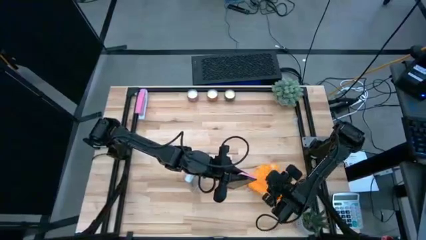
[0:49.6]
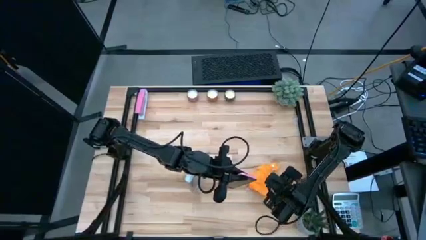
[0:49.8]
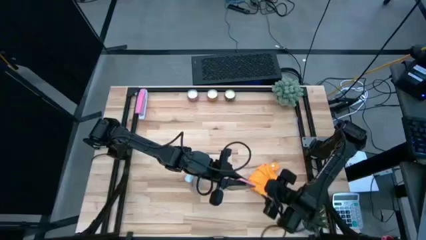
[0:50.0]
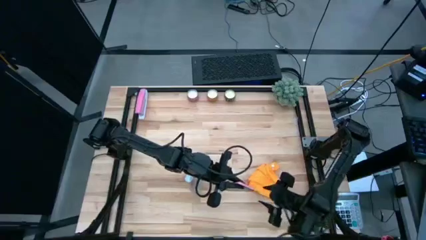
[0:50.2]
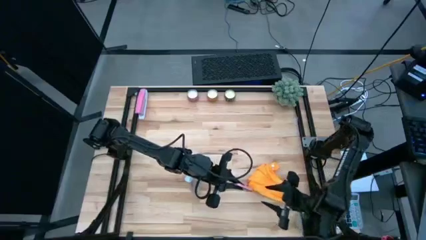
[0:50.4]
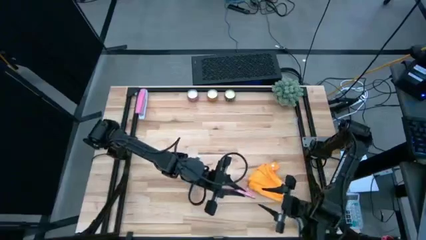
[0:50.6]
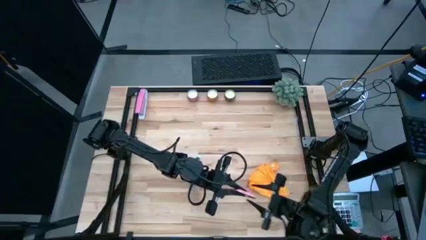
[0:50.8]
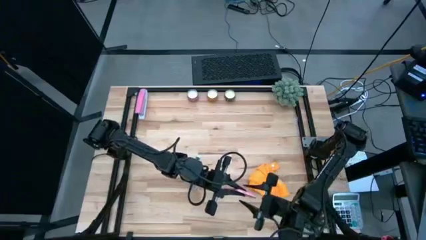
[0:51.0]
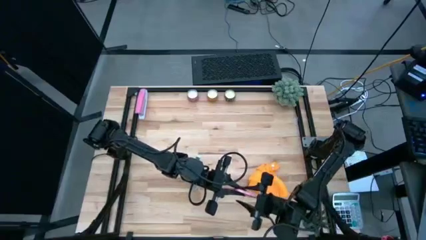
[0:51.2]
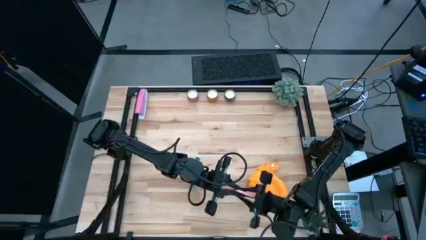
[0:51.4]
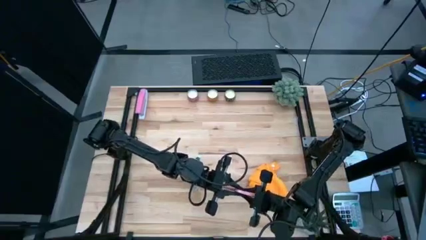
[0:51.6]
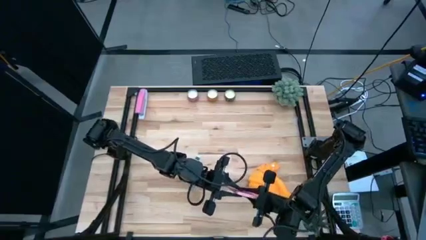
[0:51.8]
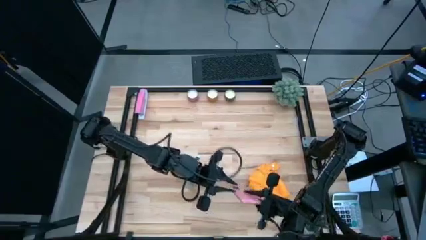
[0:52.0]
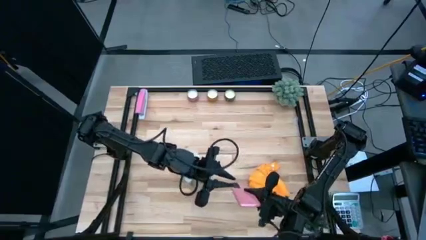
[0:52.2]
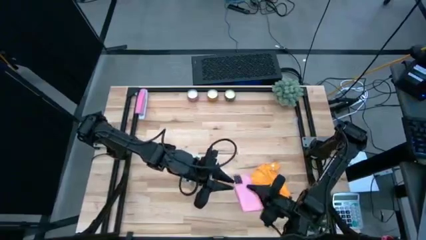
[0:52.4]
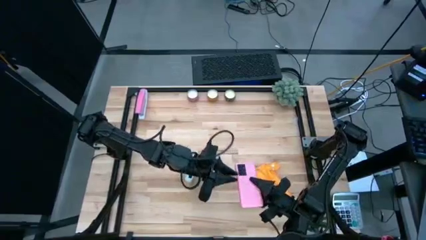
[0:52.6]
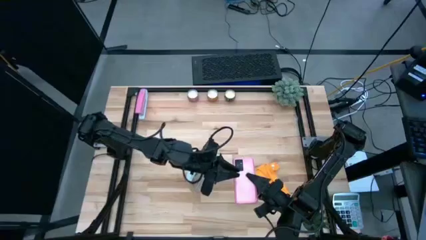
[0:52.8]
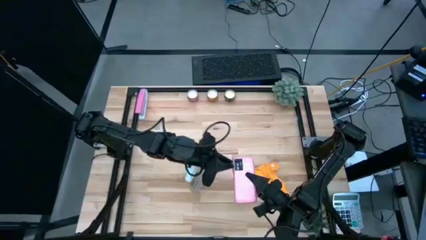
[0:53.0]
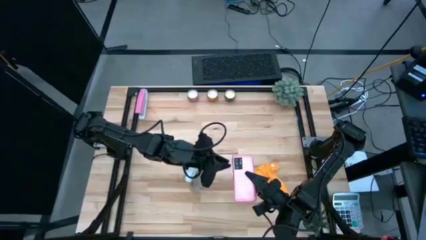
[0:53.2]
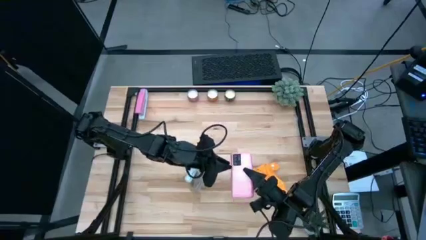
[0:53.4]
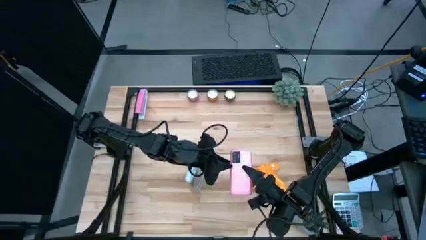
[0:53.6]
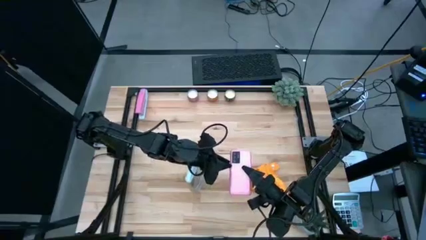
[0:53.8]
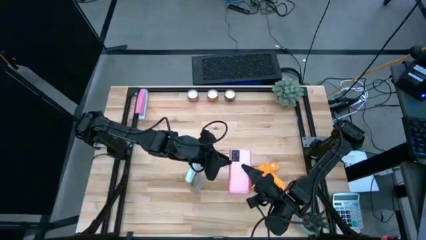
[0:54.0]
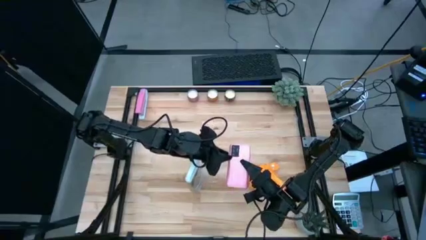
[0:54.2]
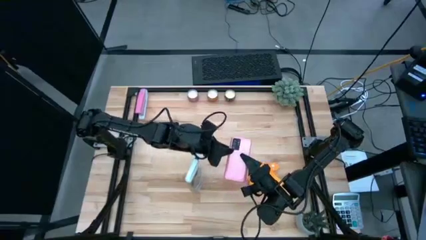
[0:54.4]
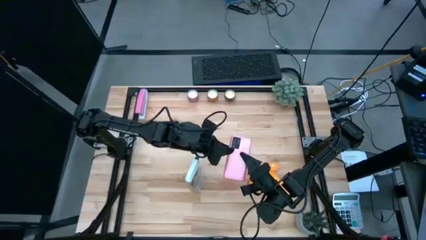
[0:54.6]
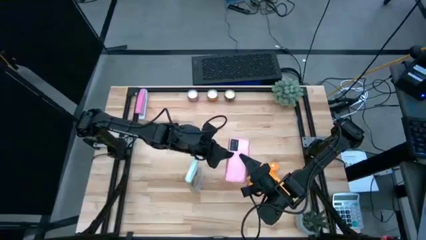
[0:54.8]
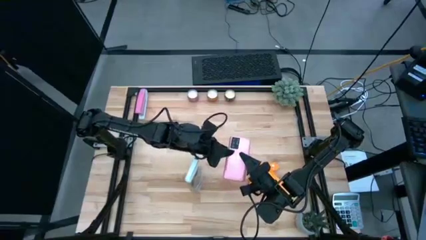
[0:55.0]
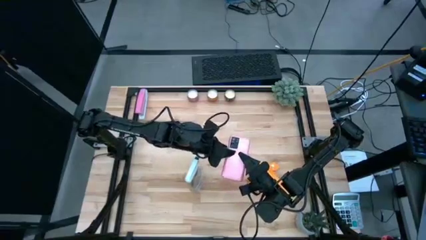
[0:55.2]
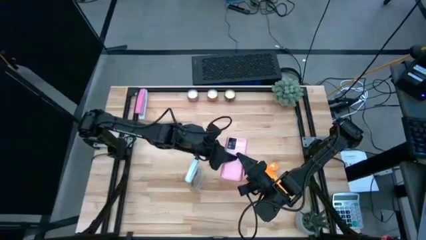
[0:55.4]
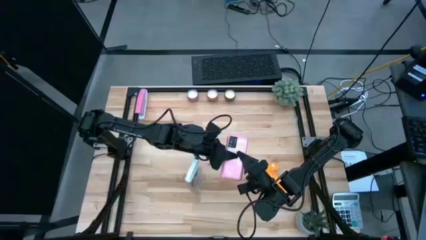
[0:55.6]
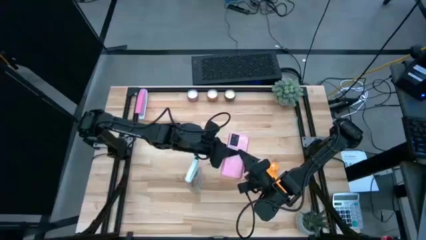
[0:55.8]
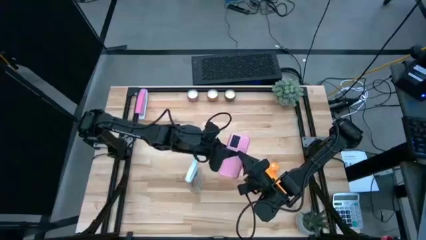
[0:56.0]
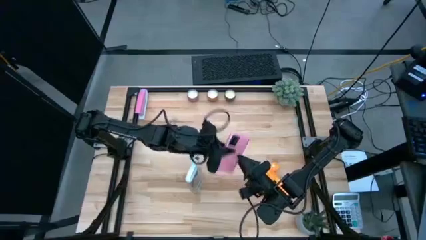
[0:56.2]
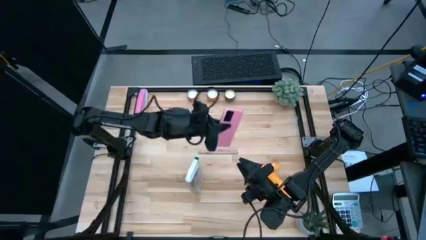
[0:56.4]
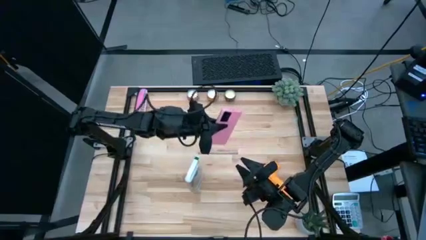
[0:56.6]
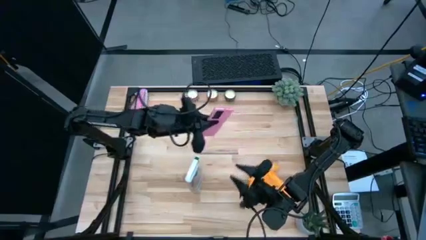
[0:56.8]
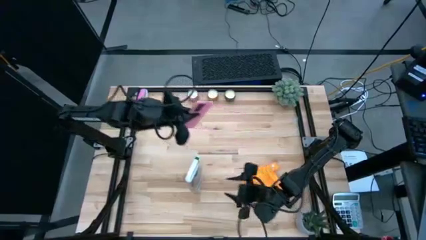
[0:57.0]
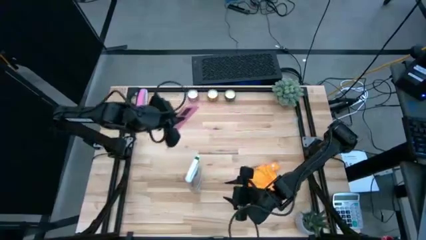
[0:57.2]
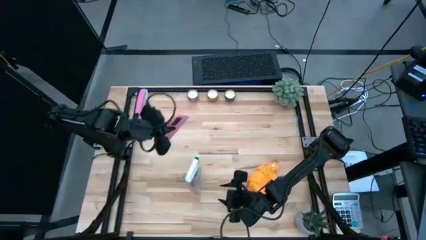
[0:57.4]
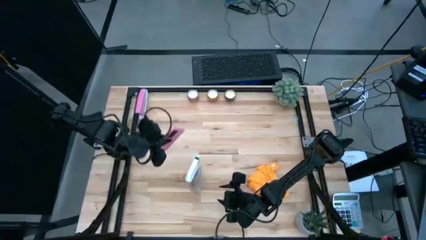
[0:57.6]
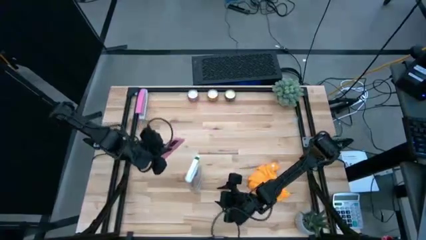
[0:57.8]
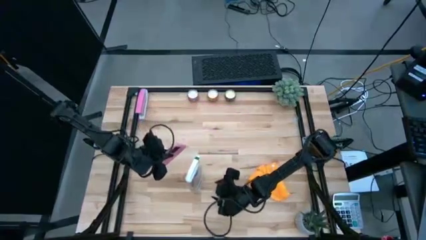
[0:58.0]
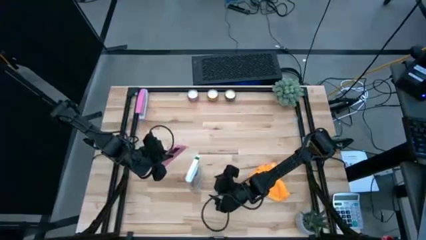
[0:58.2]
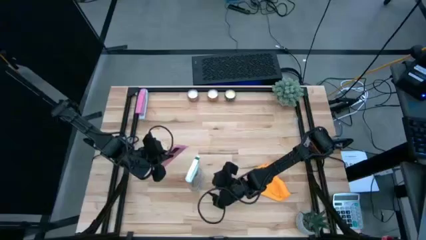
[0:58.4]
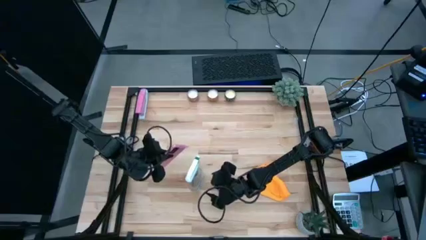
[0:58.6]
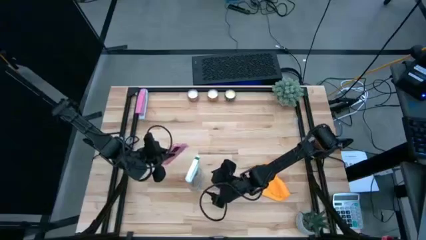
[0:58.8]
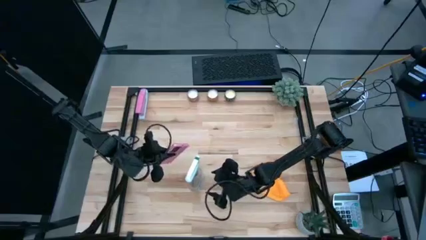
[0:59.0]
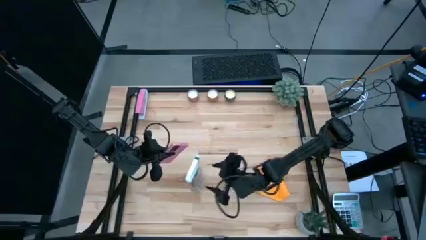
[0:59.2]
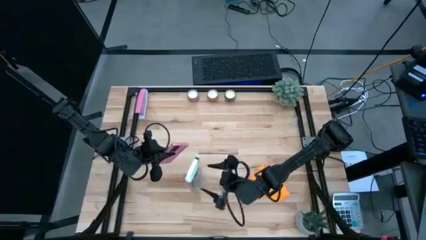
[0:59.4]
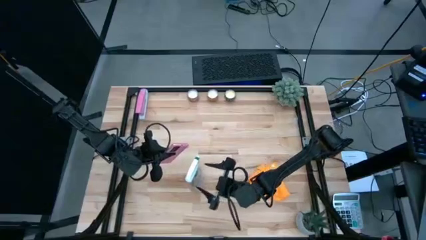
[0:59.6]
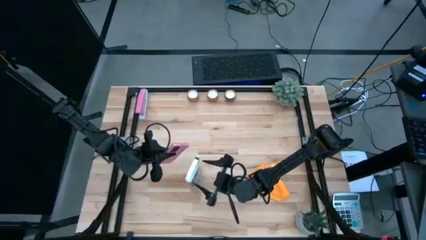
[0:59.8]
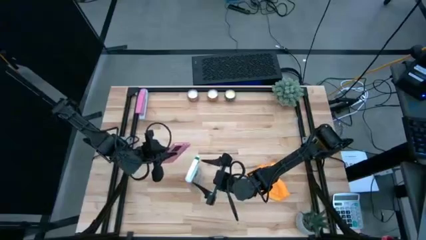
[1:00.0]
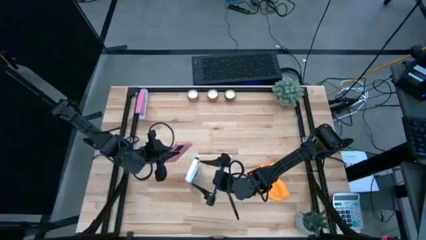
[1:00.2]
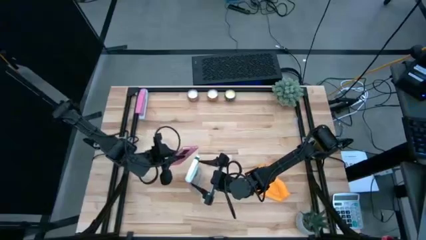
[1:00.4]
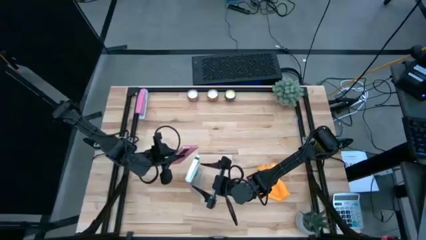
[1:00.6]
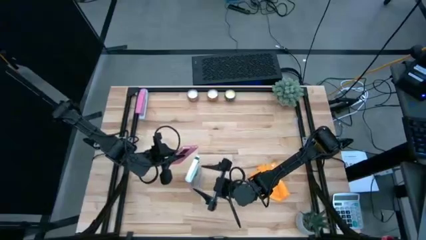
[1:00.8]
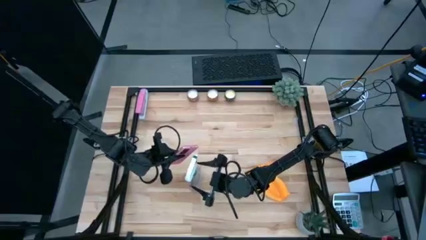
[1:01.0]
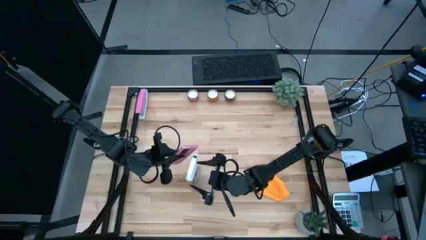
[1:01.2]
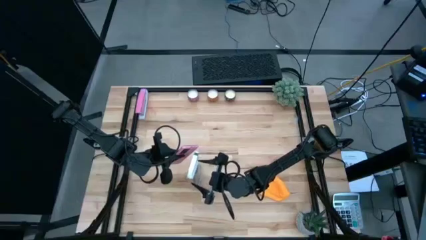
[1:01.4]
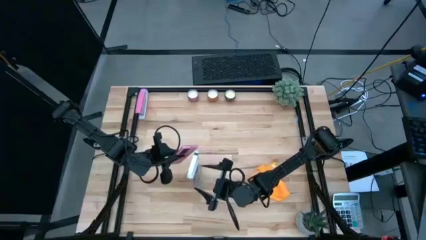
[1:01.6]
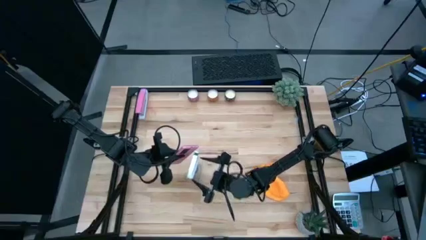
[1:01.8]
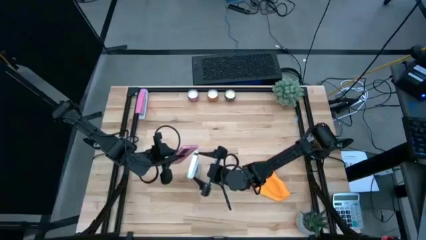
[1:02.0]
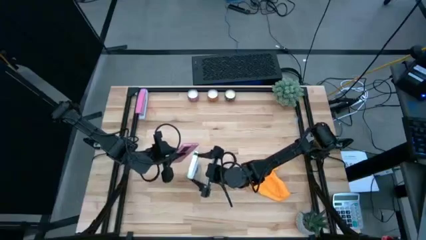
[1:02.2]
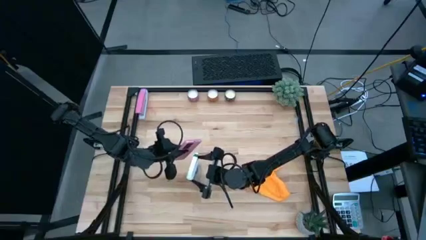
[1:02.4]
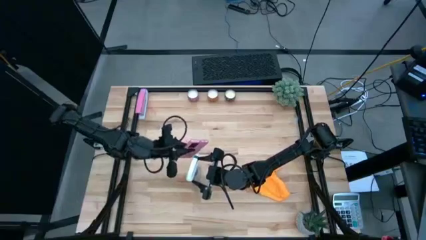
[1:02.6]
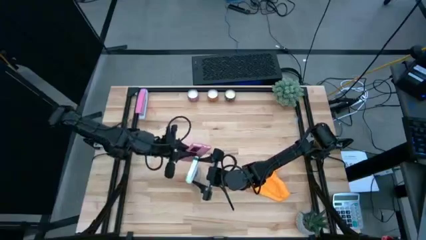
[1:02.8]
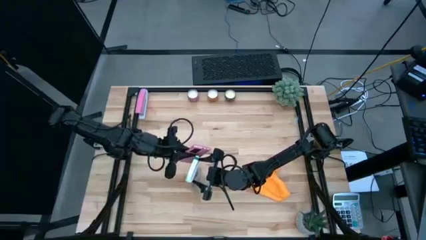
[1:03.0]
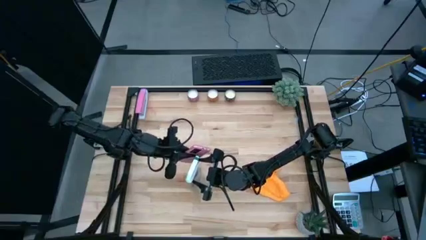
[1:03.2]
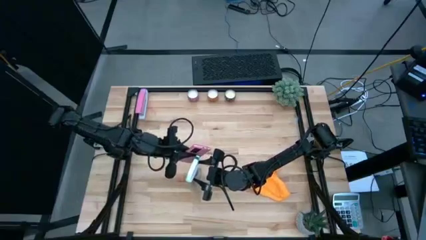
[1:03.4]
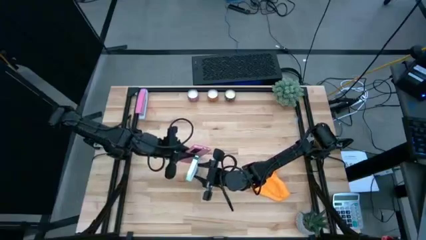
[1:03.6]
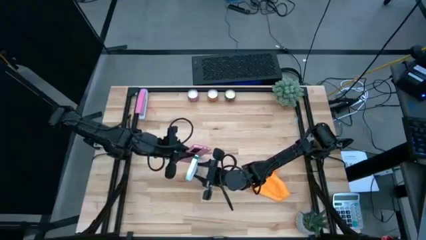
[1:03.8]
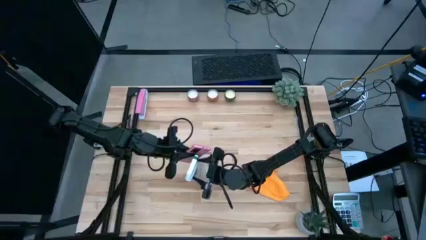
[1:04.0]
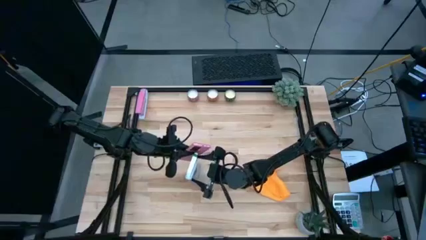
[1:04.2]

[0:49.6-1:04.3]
Task: Apply microfiber cloth
Spray the back of the cellphone with a spray bottle

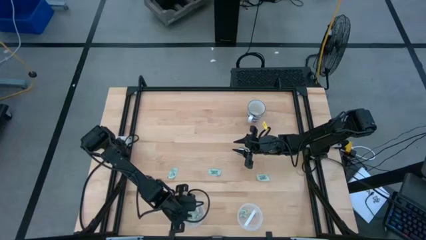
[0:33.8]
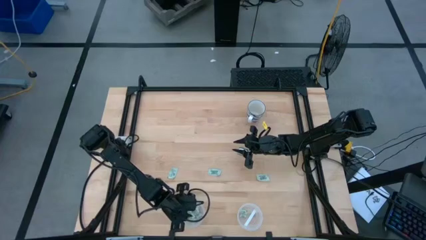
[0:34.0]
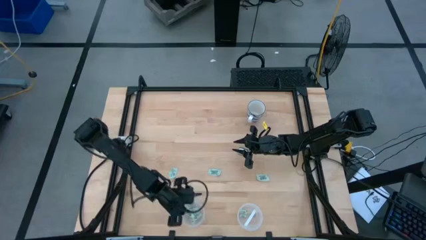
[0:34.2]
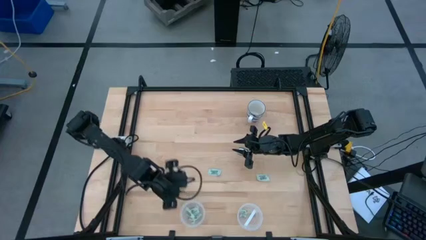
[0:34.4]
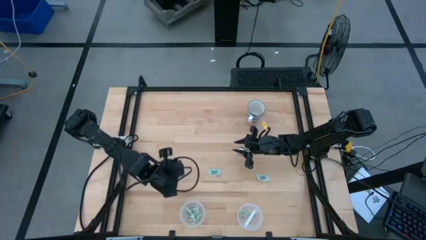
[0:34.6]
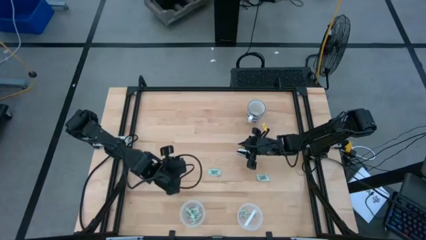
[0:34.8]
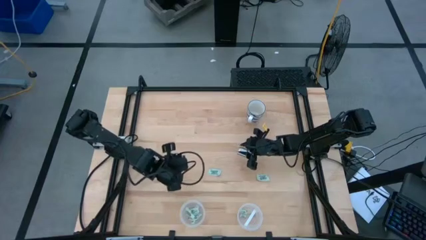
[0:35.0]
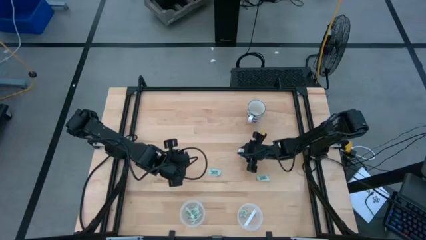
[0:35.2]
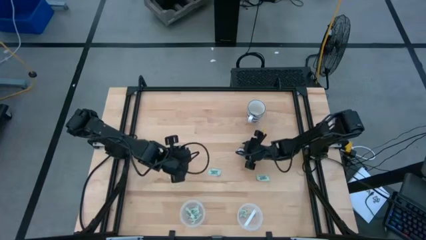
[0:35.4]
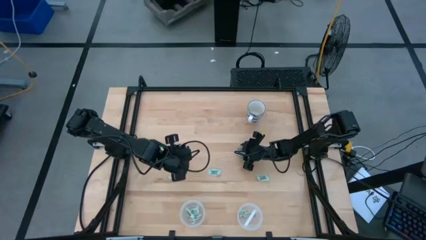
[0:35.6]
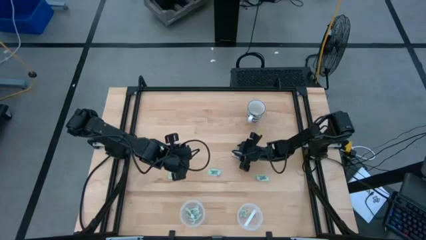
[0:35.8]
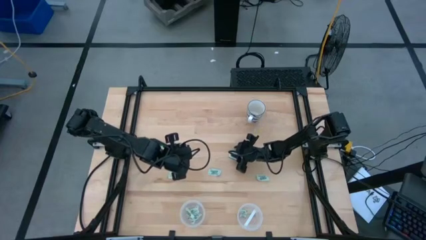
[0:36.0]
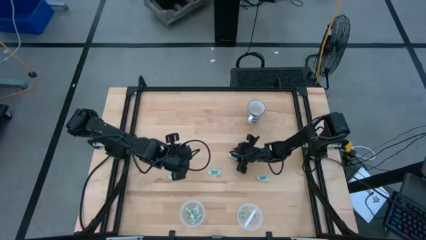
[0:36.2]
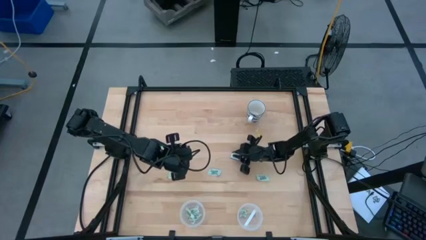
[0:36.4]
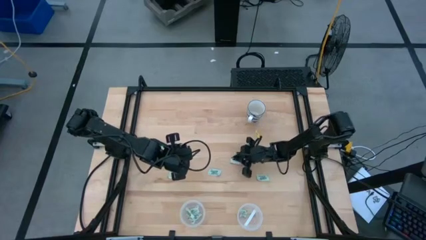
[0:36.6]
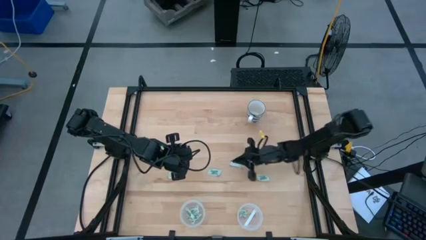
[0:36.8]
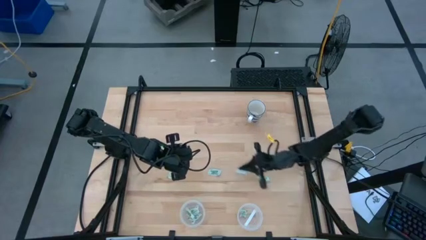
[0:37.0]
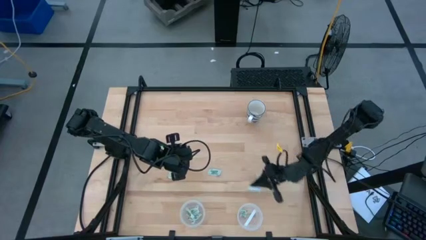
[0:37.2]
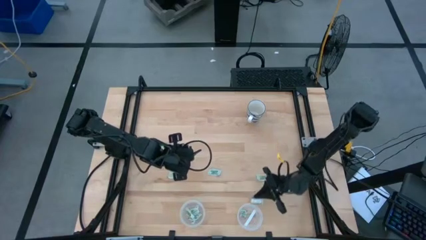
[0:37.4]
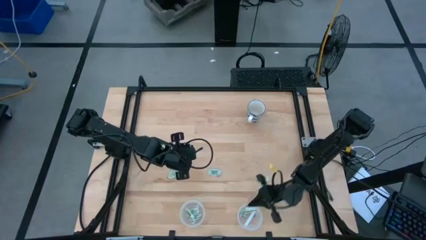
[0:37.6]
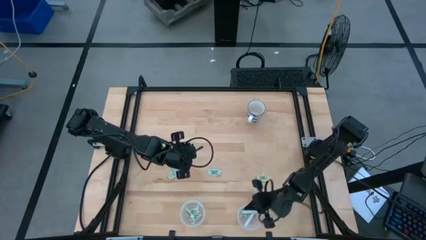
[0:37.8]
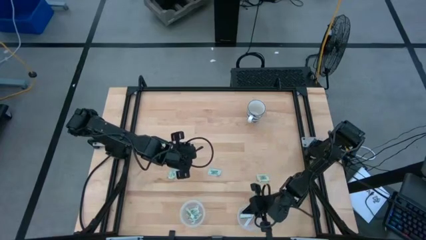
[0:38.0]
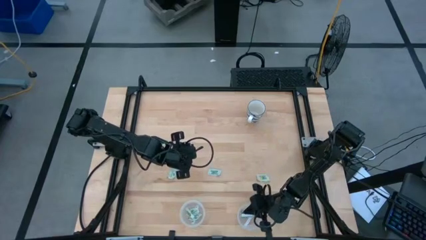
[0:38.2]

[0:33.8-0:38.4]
Task: Pick and place Stevia / Truvia into bins
Put the green truvia packet into the right transparent container
